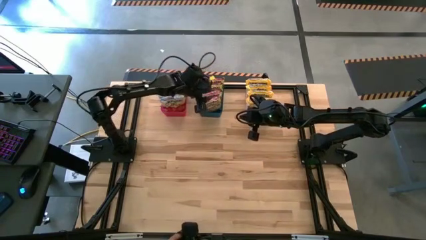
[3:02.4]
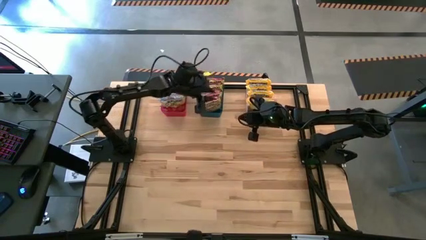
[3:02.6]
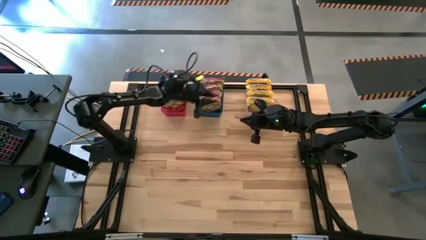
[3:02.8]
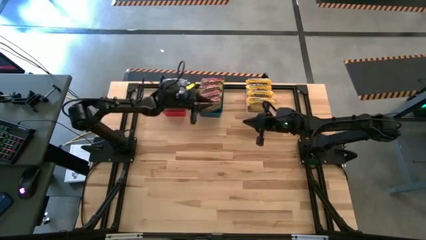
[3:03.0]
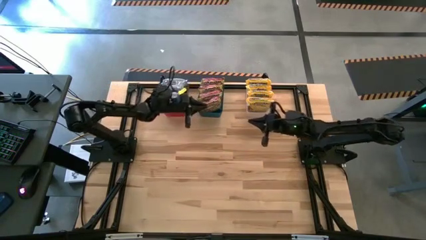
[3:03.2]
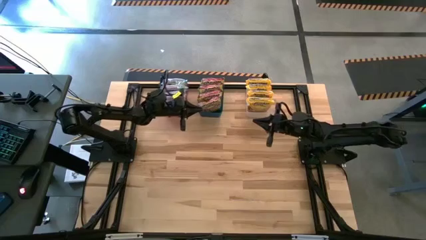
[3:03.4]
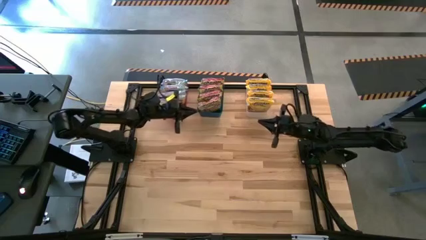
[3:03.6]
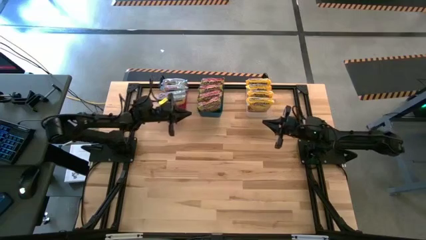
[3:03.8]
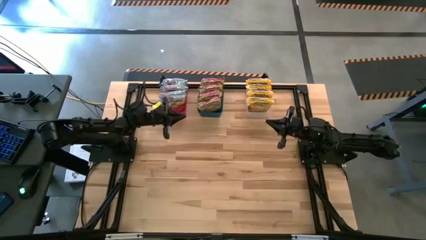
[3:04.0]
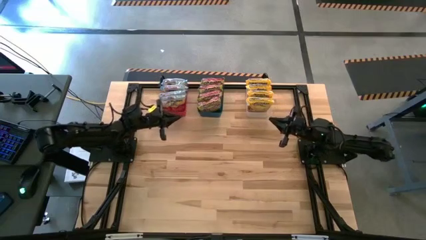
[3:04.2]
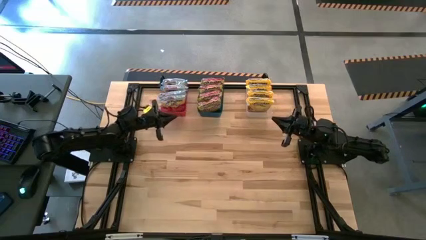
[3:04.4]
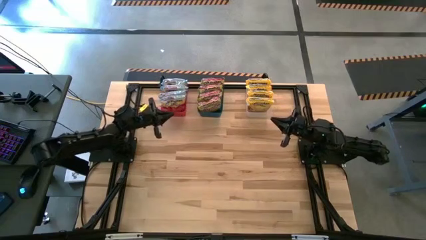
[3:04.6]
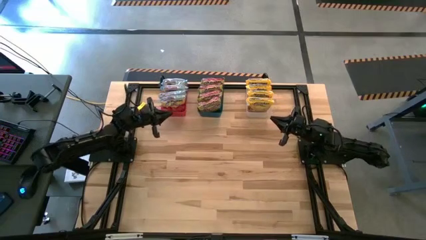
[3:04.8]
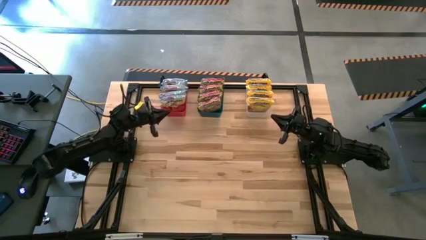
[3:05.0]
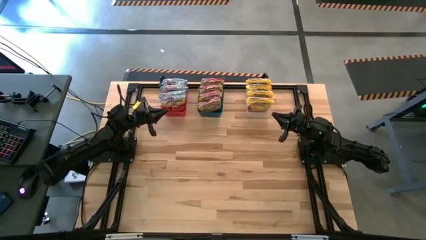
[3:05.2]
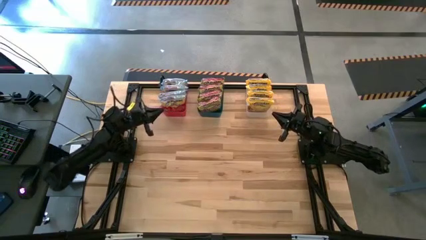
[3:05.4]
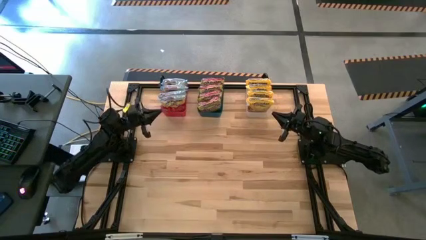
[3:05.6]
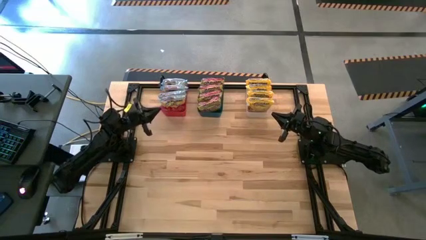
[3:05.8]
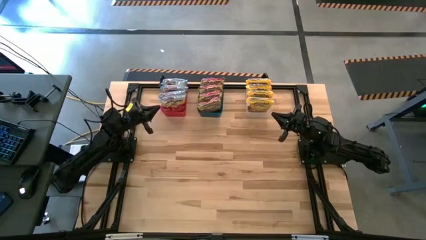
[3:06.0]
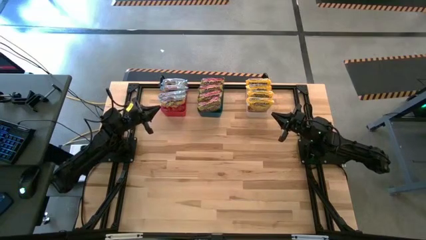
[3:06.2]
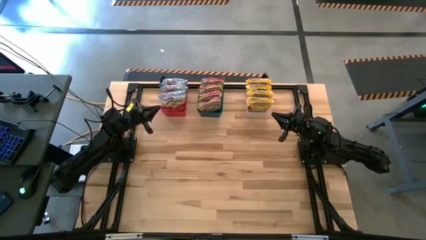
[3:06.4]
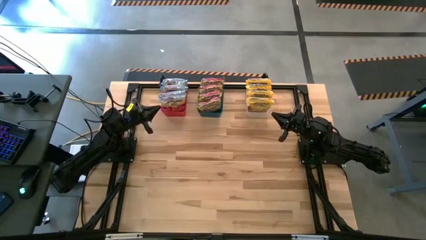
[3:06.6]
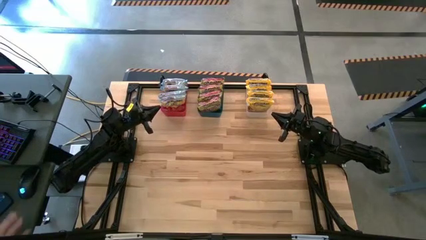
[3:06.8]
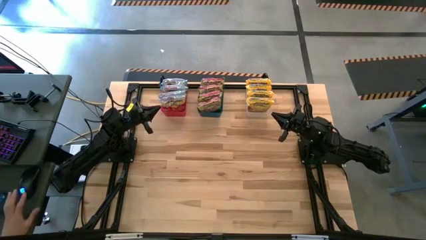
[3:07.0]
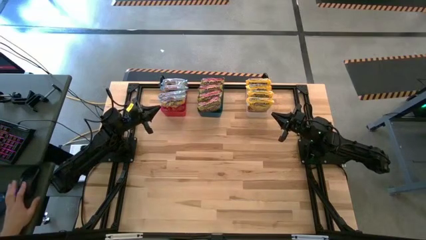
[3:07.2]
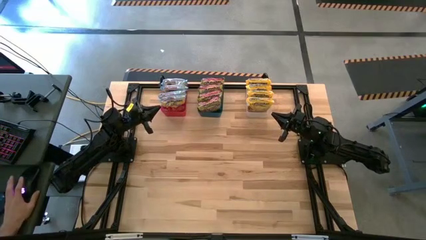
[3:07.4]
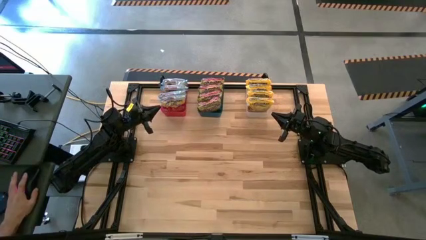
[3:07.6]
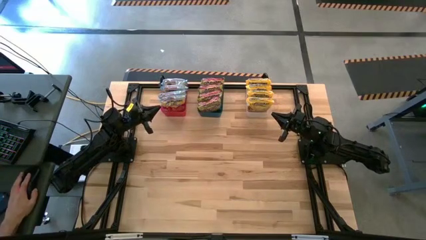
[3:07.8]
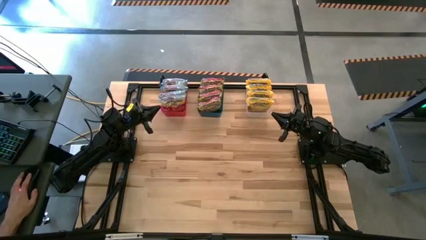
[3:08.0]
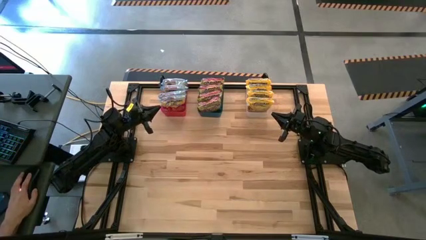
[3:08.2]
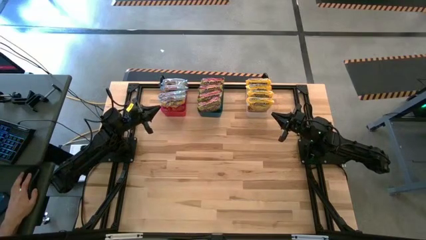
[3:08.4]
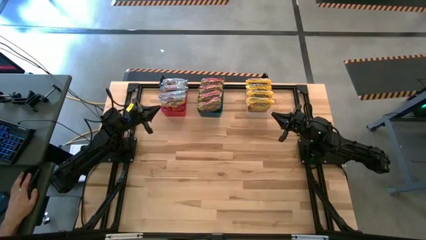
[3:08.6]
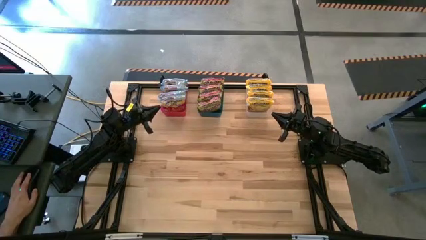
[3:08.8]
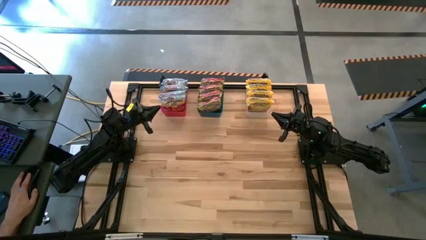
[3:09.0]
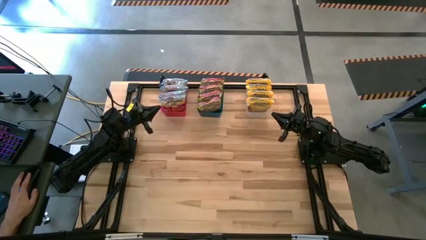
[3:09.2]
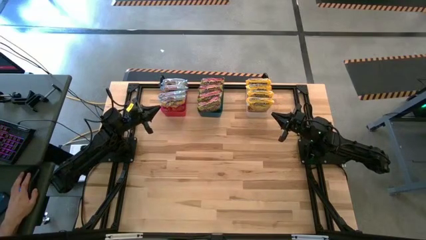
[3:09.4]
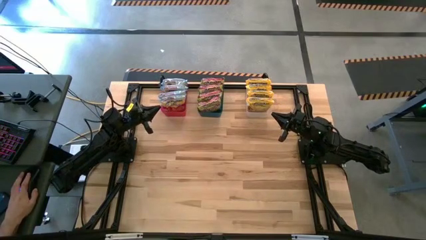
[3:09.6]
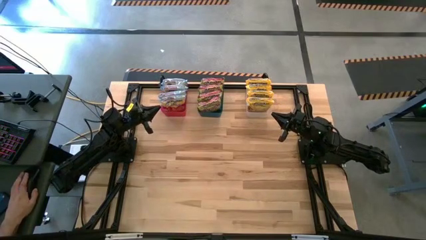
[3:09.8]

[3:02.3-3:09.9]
Task: Sort Maruchan noodles
Return to Home Position

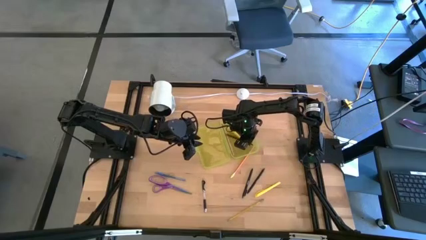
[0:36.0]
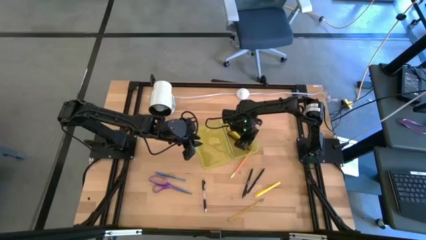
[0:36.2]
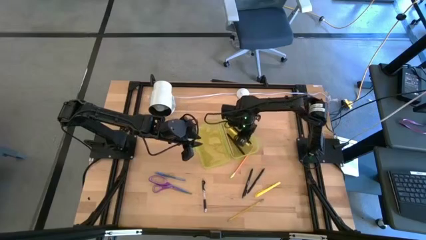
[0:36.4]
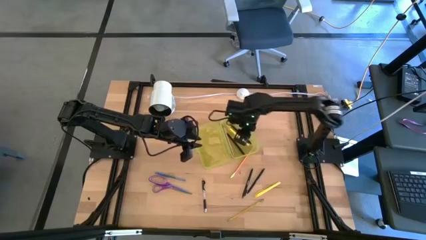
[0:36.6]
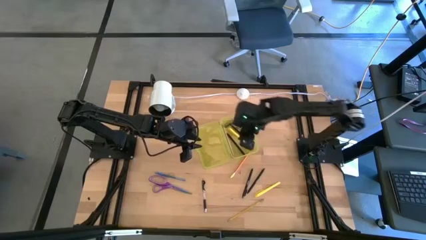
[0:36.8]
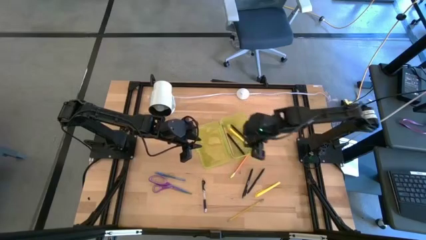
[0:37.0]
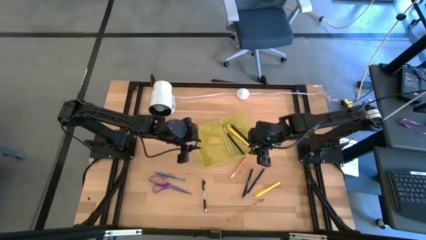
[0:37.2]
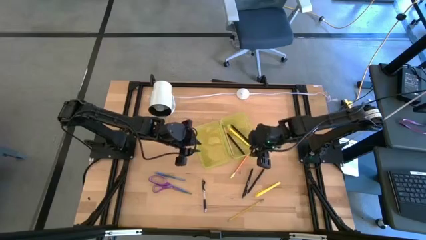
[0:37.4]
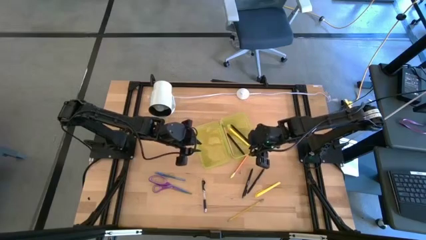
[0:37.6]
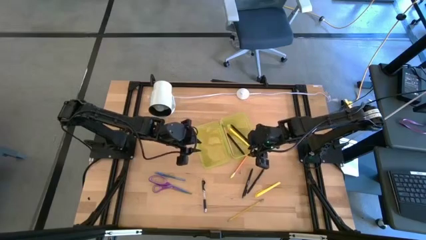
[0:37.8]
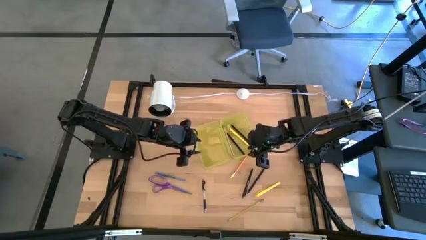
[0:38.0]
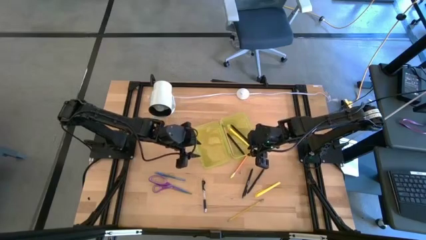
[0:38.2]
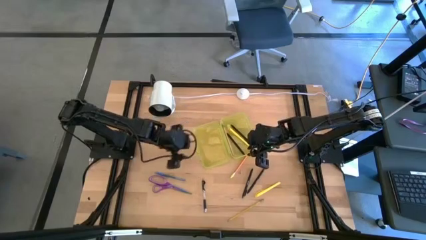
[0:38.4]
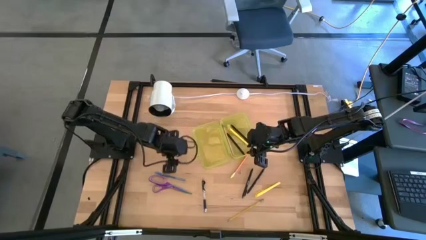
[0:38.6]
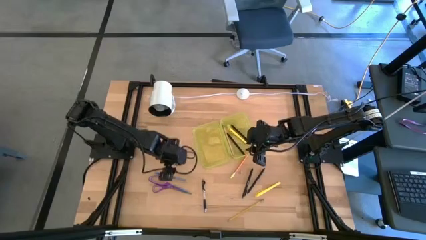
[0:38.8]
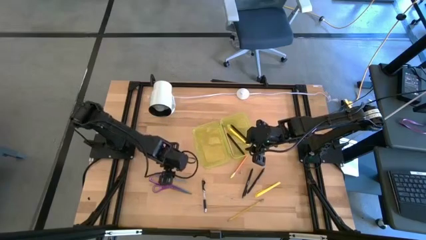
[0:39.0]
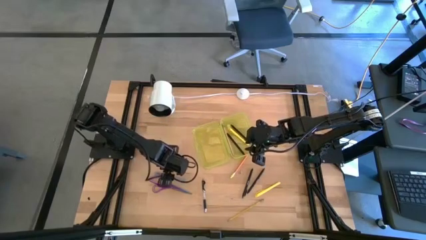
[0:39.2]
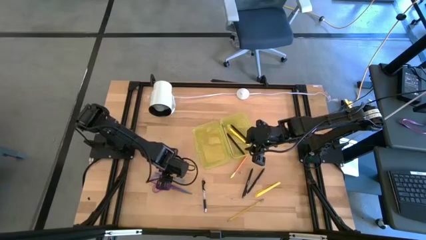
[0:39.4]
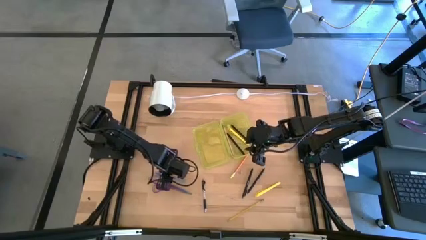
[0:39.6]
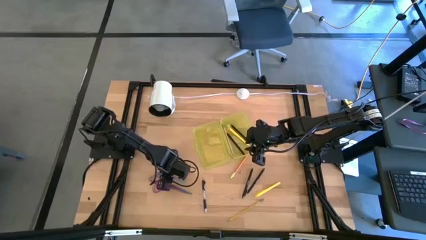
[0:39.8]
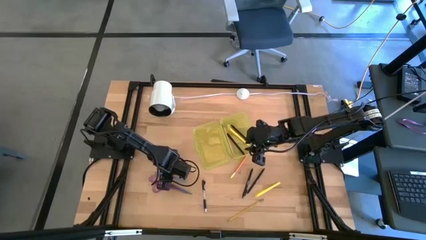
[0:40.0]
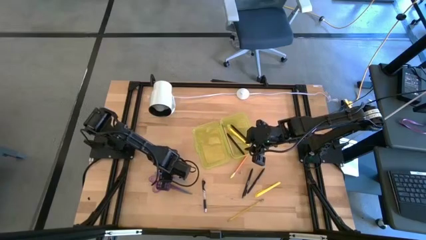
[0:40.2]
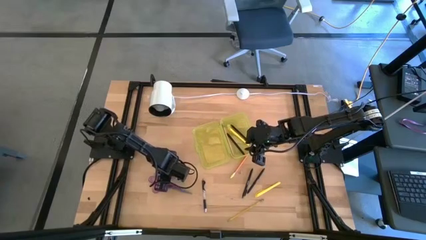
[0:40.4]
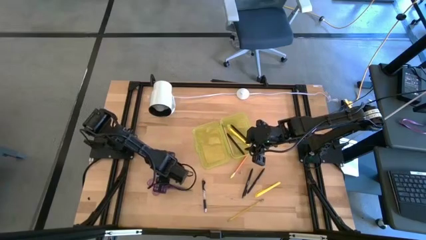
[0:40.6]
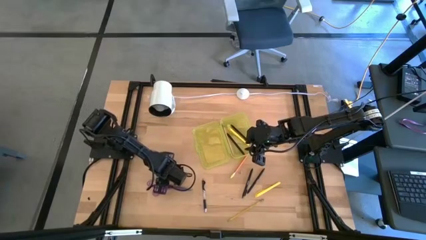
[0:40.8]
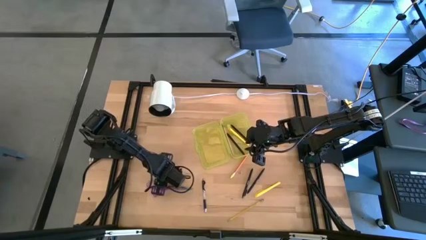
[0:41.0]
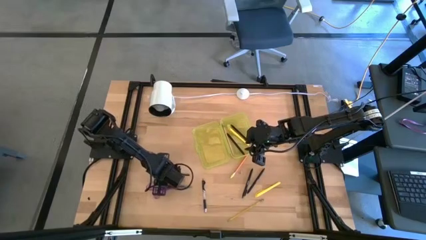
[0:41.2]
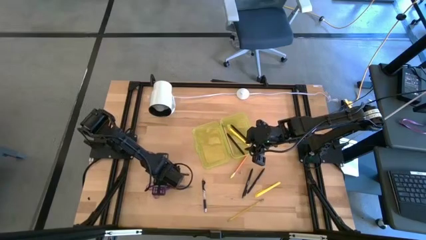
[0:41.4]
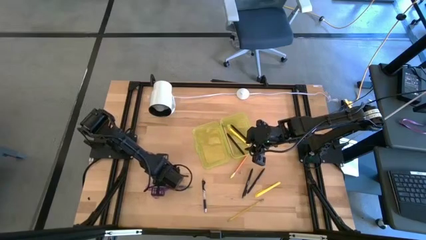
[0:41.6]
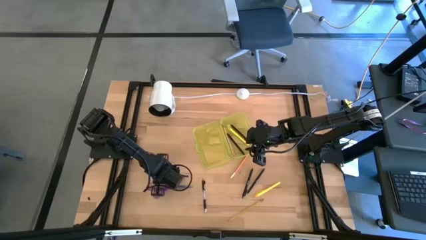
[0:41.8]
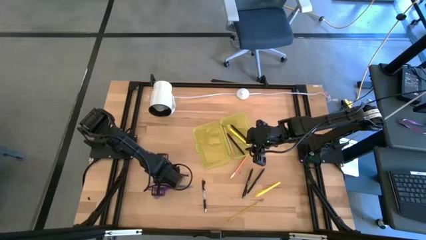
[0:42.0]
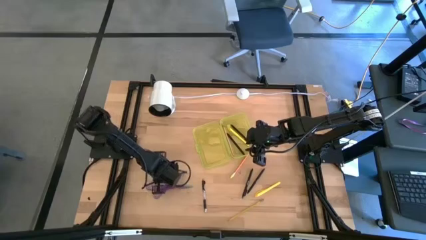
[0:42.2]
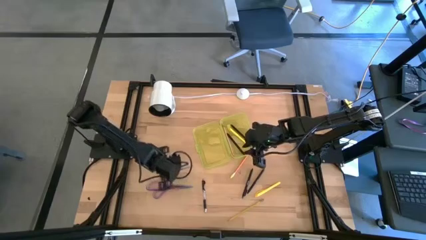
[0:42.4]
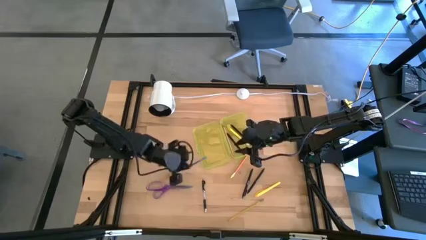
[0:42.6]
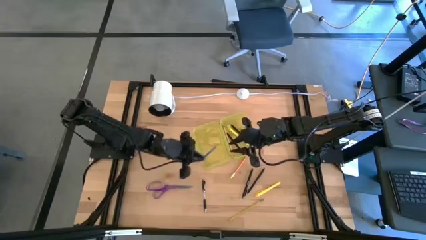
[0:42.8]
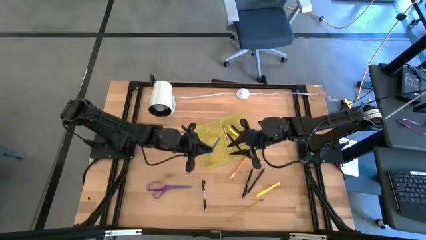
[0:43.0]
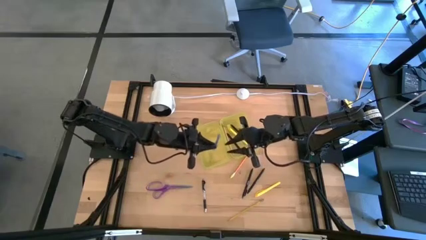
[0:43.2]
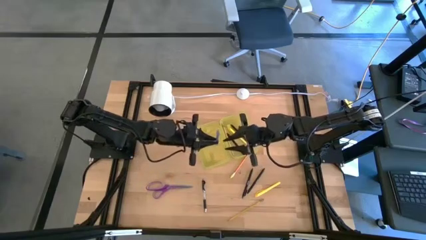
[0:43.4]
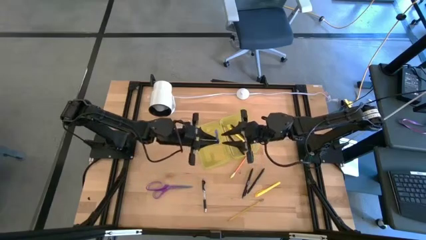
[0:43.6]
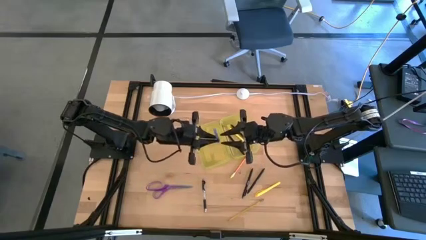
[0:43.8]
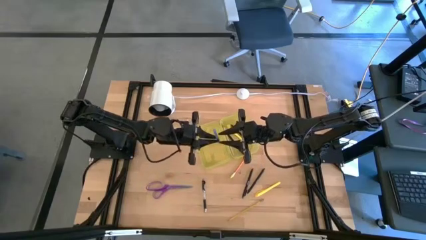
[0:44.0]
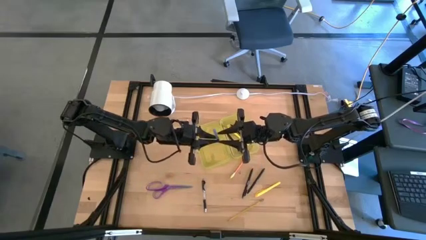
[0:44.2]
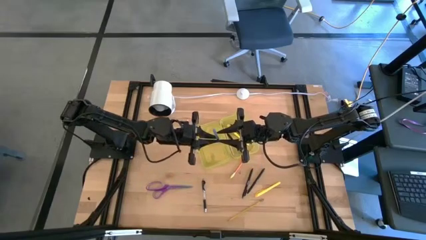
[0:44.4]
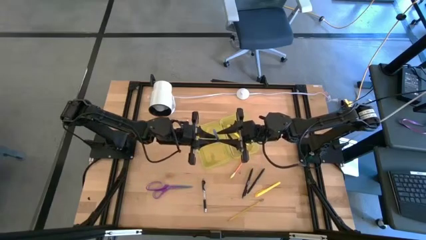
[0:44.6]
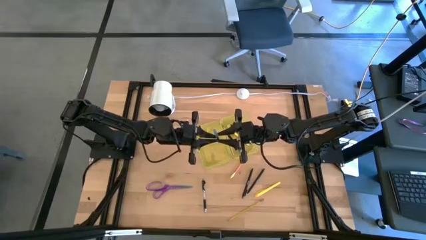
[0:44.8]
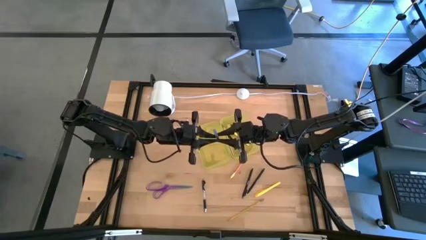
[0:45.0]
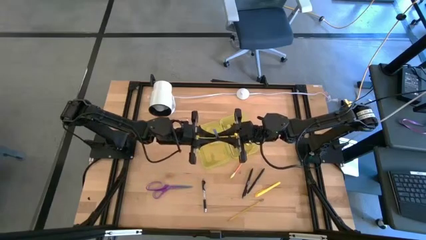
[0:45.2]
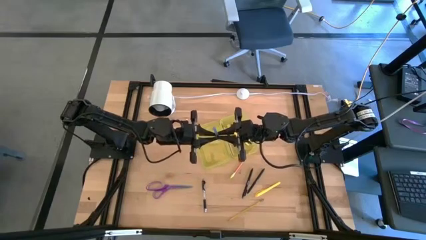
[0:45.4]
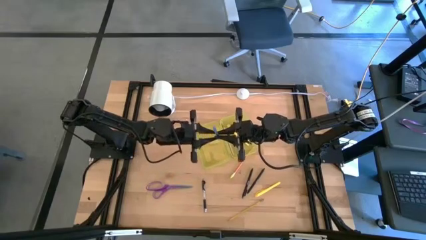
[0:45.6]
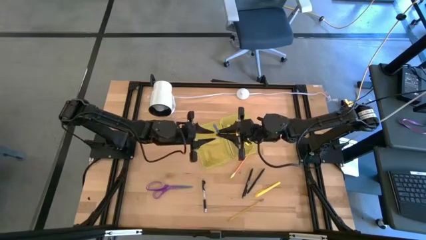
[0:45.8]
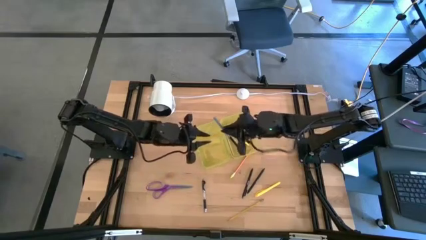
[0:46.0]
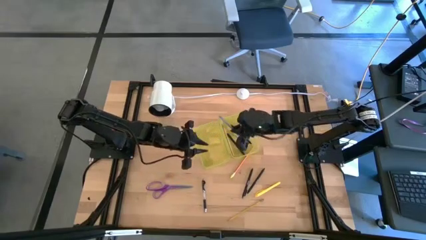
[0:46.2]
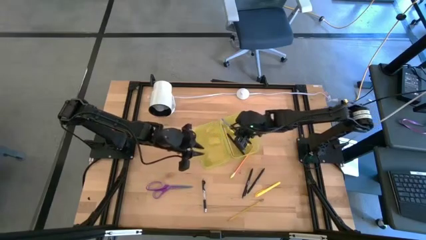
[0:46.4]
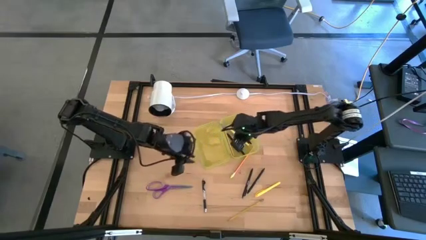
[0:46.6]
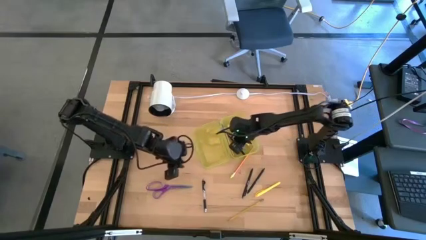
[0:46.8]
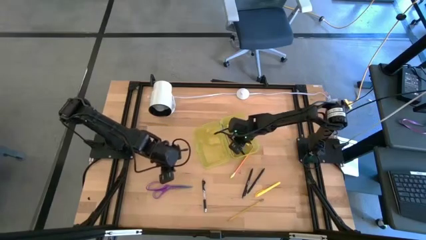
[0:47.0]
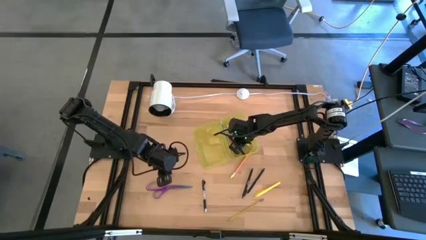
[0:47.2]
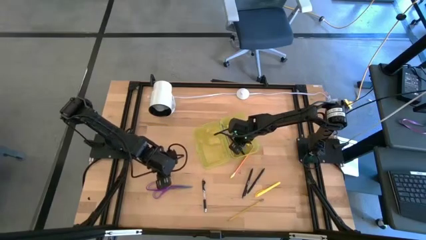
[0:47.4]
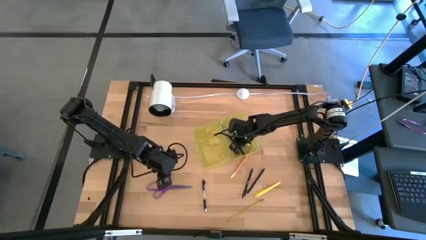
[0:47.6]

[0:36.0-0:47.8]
Task: Pick & place school supplies into a supply box
Put the blue pen into the yellow supply box
